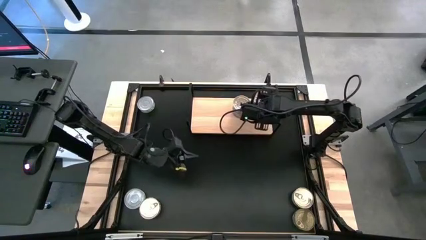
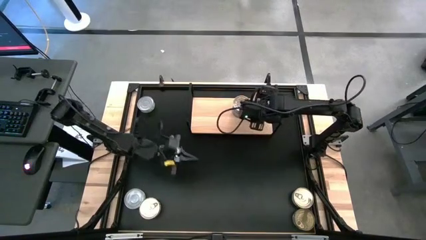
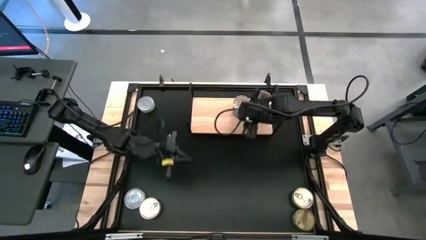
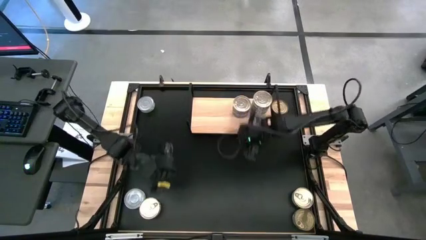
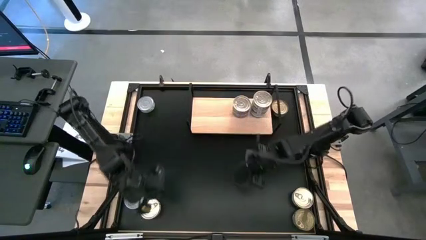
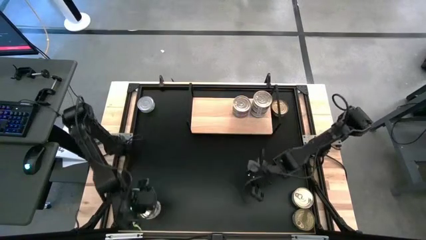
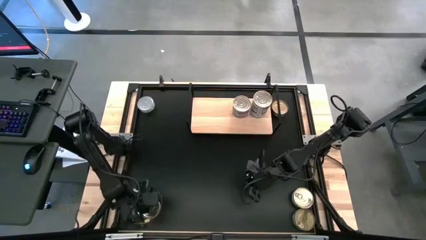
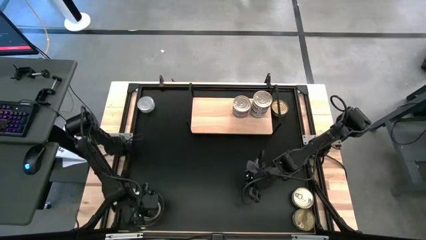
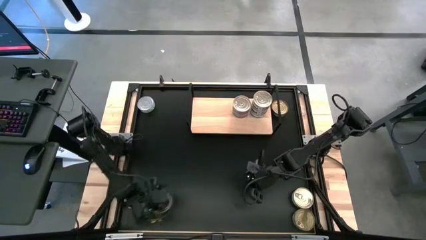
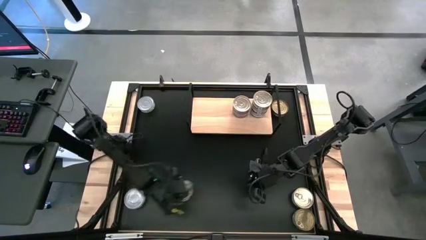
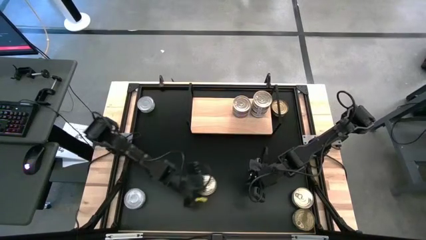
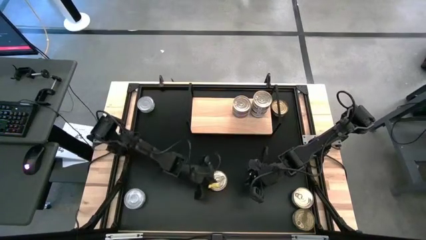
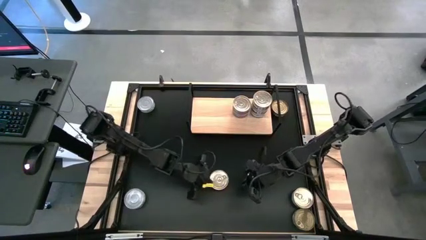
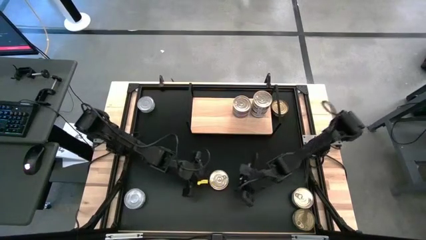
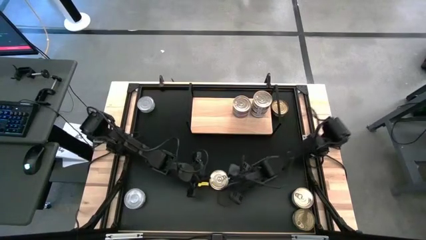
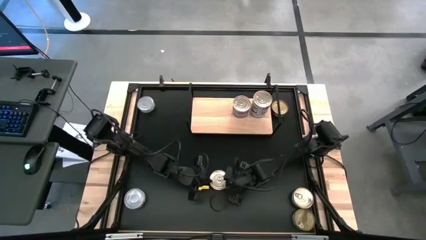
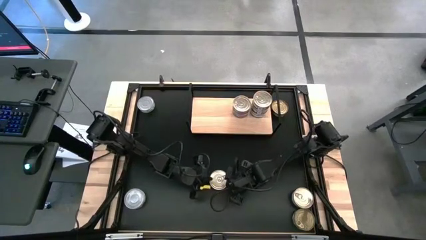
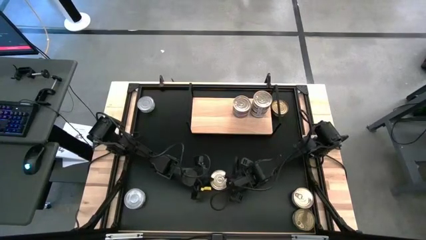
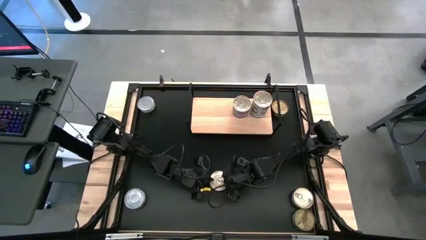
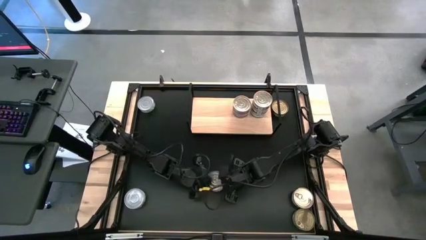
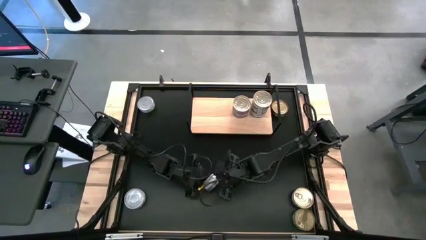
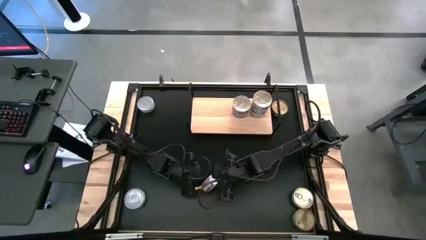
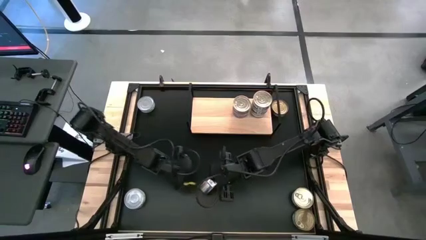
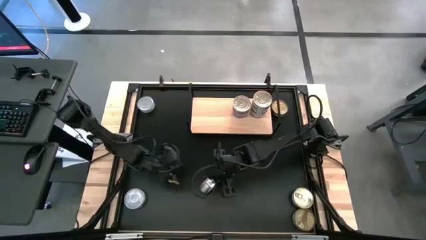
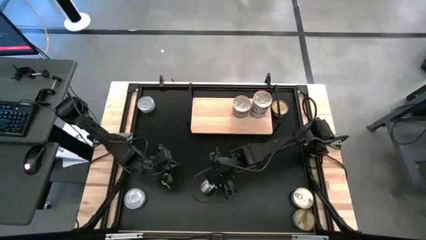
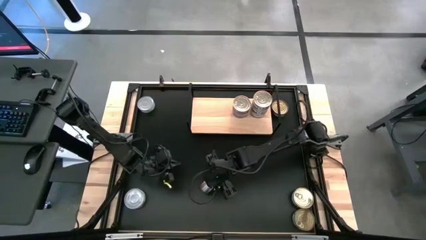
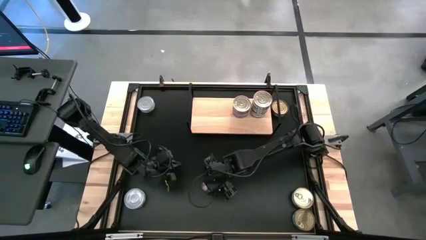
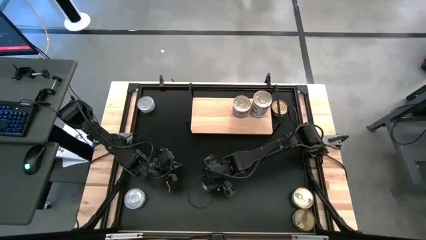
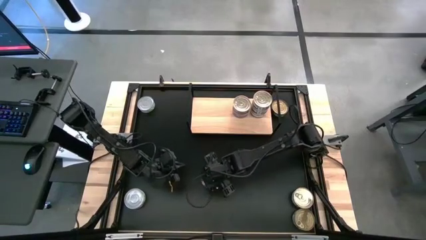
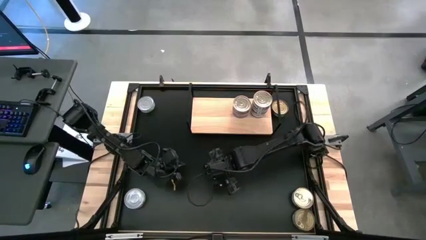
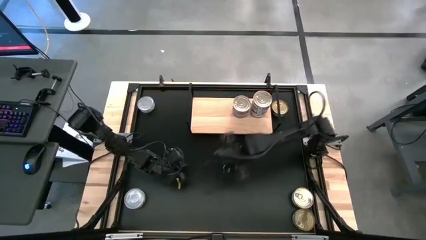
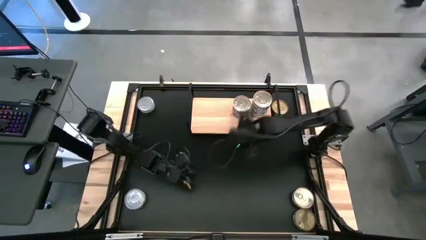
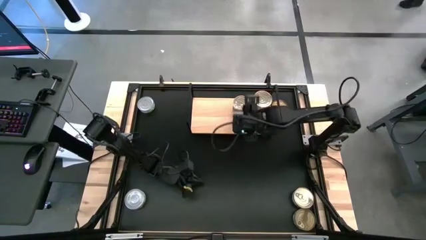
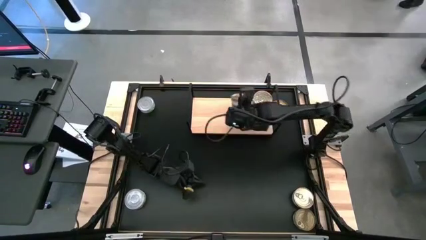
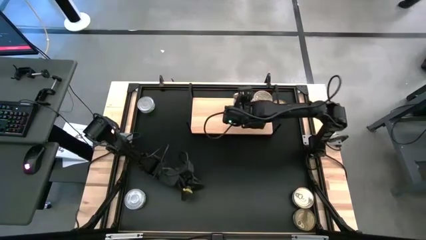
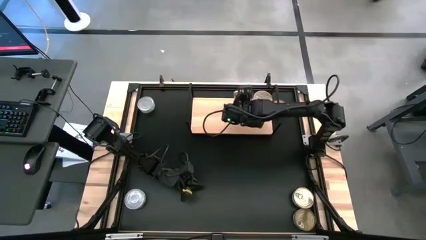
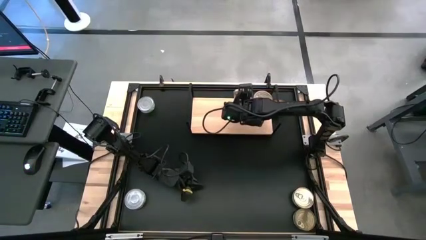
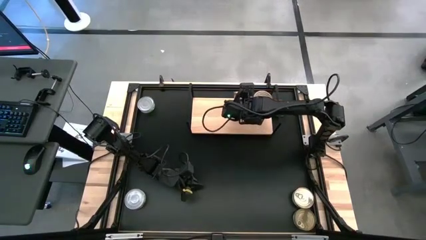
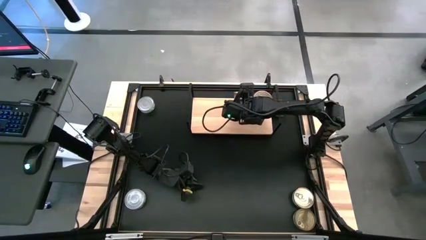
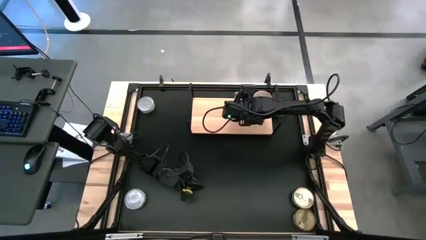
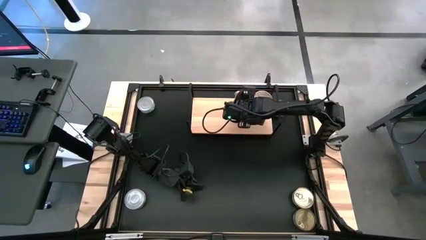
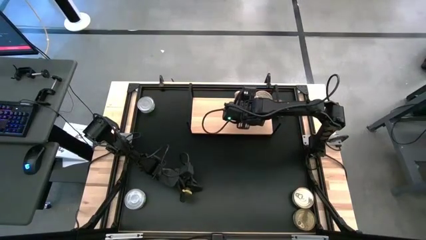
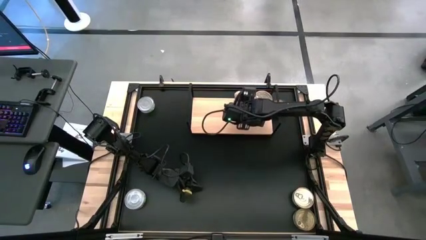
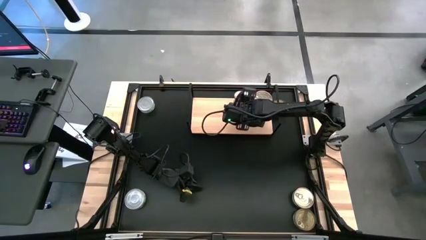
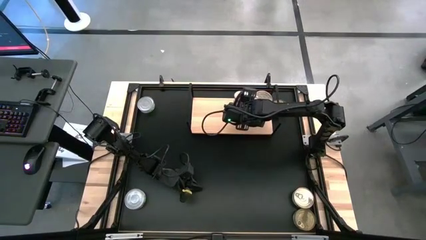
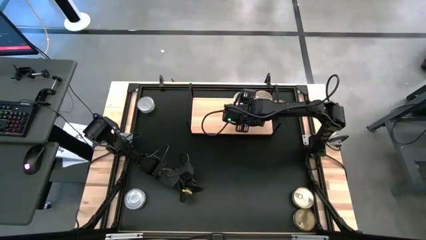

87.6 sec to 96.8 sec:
Task: Stack canned seafood by type on shelf
Stack the blue-pink tuna can on top of the other blue-pink tuna can on the shelf

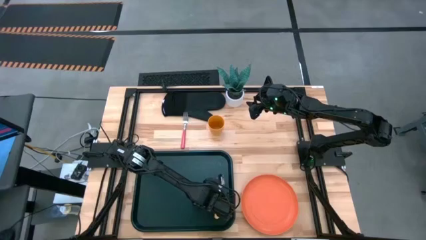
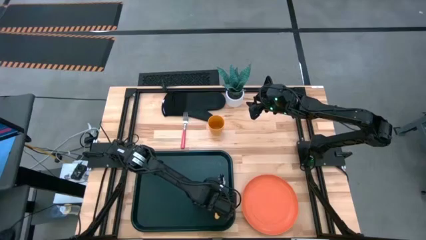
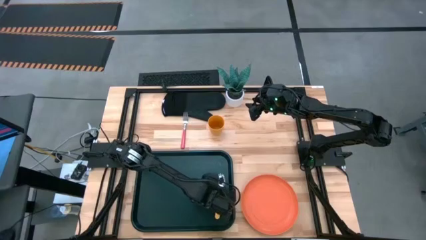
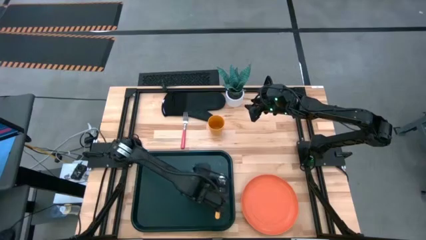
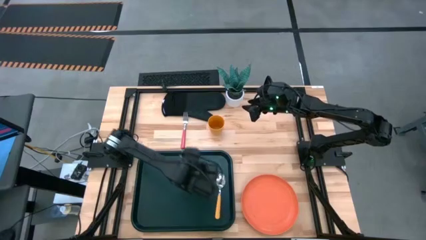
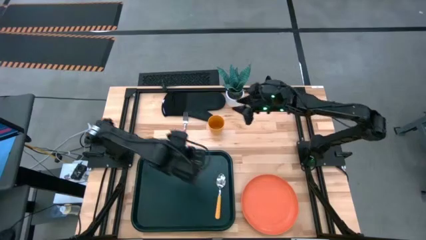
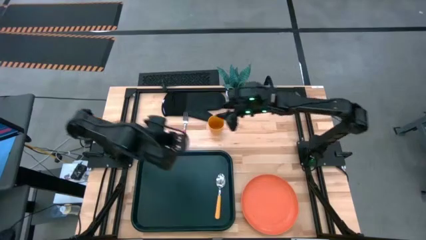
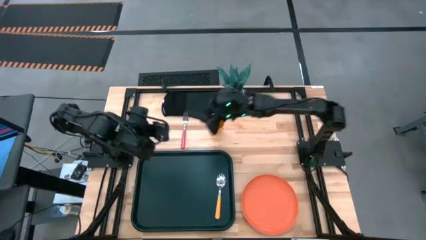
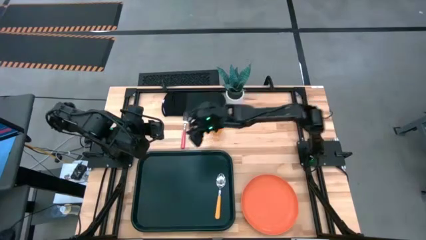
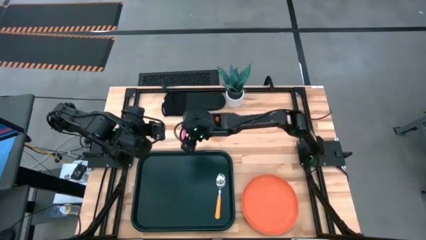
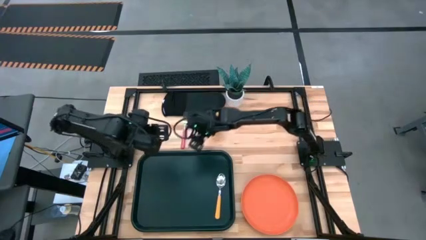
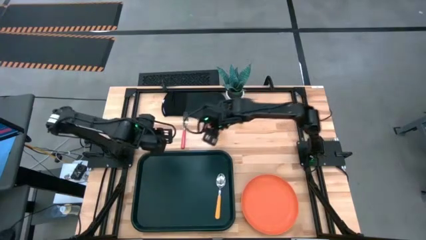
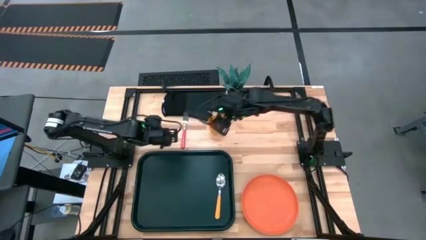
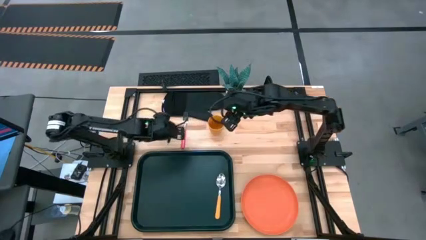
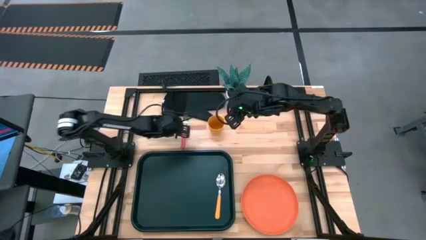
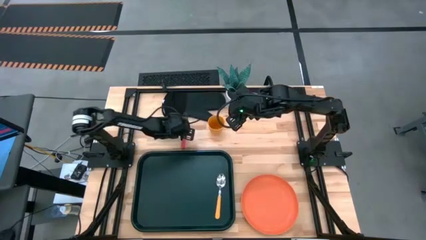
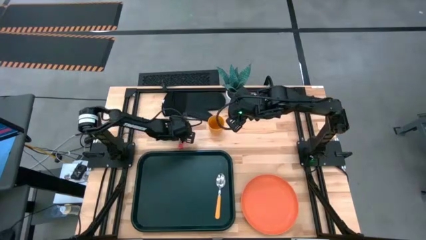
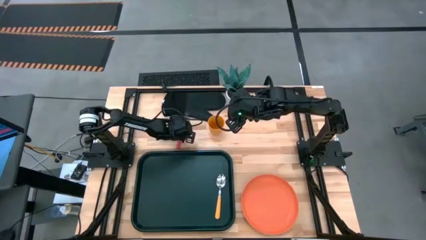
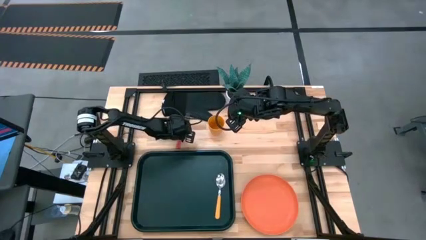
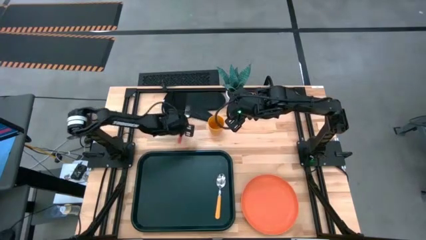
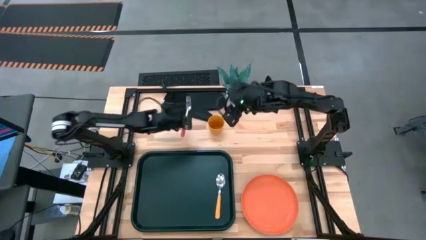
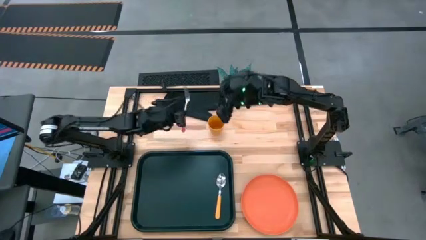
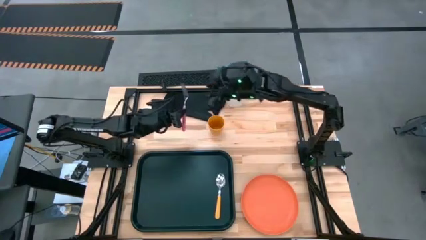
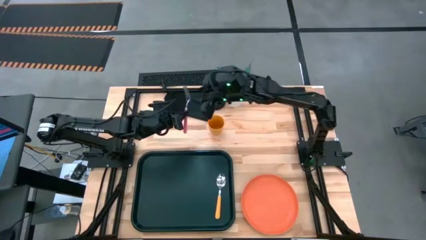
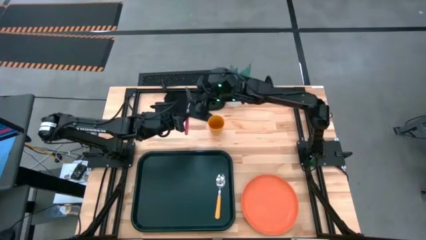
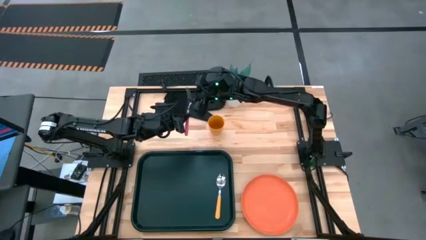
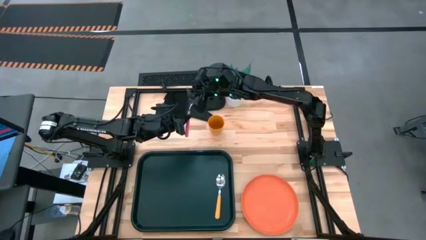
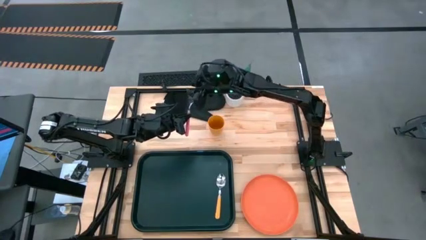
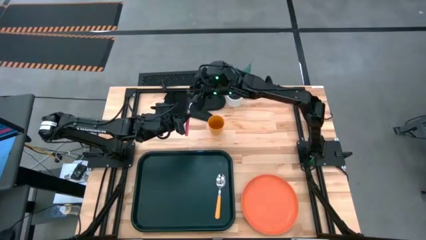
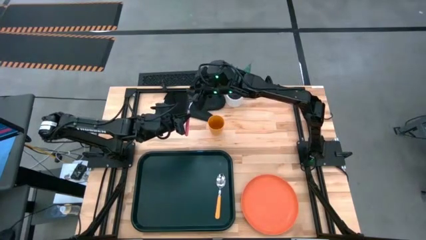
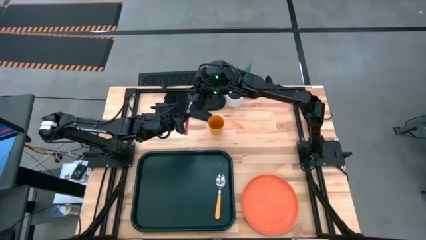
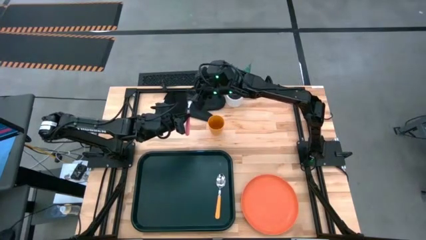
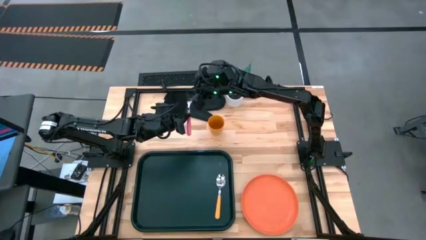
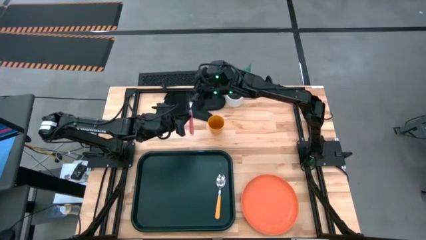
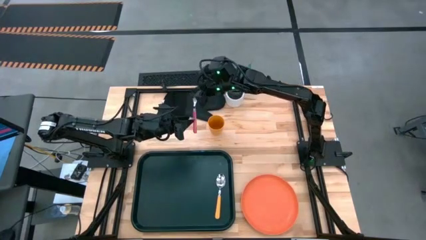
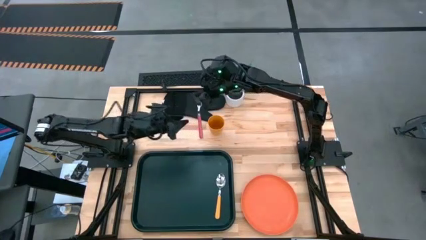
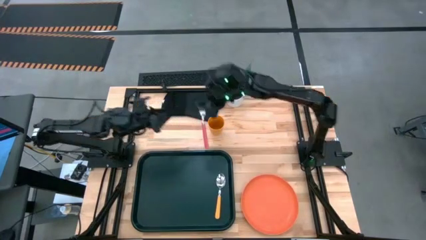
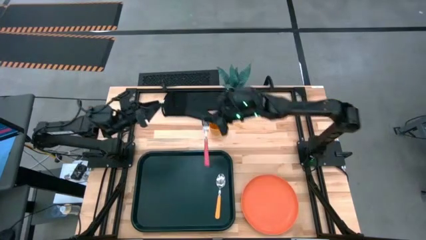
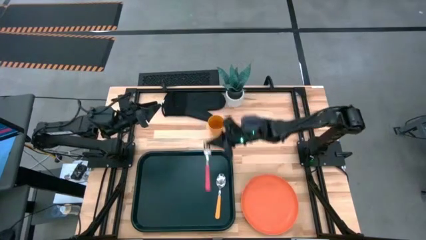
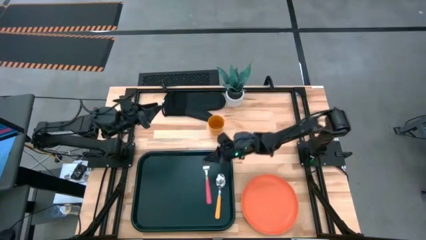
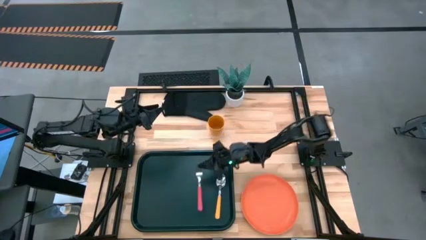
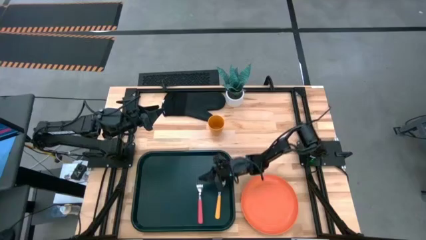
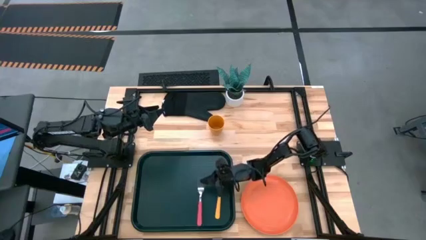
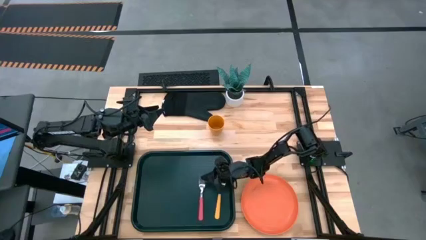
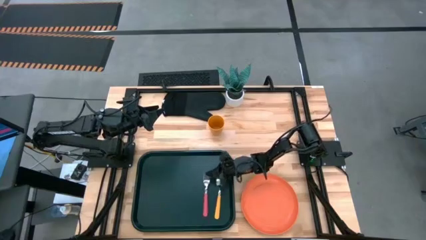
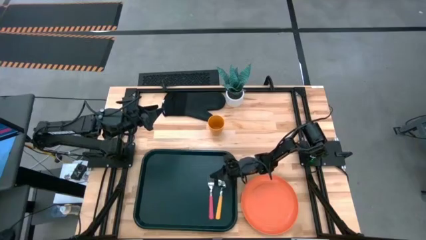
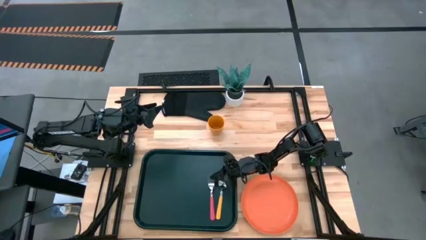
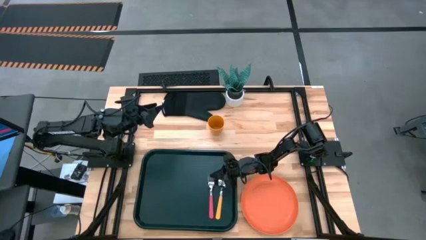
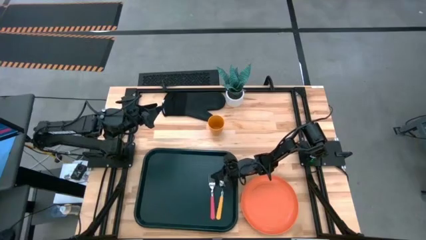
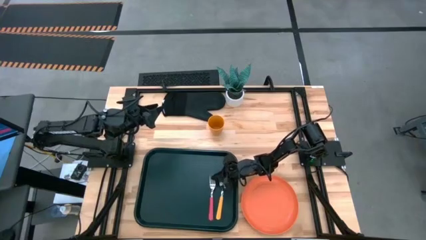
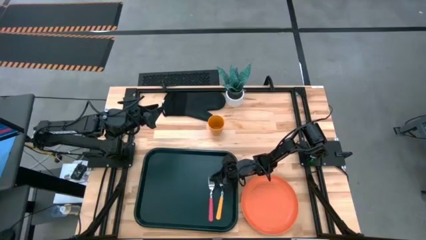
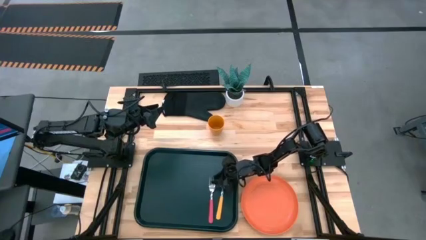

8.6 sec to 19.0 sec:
Task: Pick and place plate/cup/fork/spoon on tray
Put the fork on the serving tray to the left of the spoon
